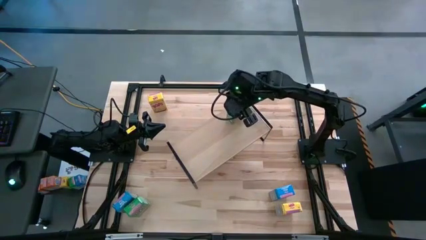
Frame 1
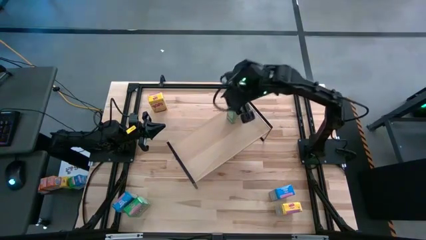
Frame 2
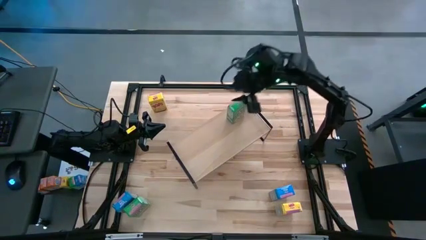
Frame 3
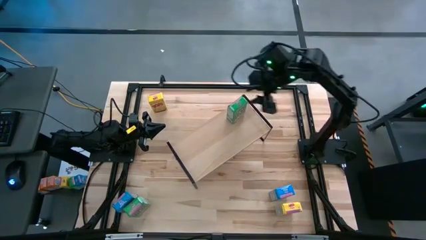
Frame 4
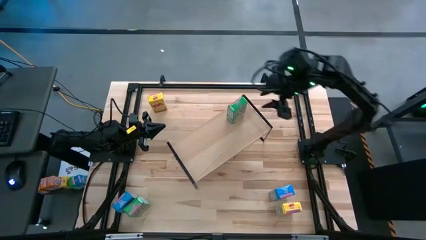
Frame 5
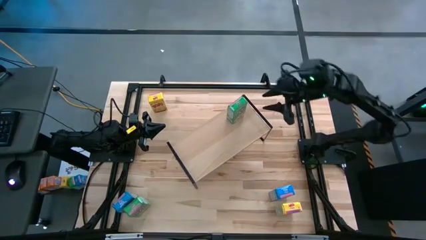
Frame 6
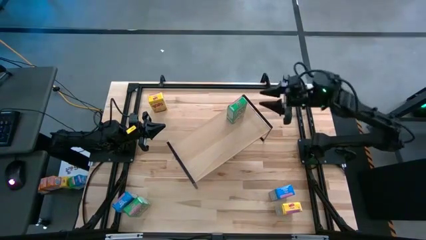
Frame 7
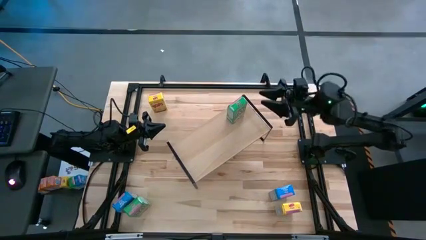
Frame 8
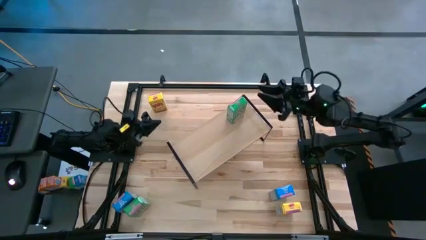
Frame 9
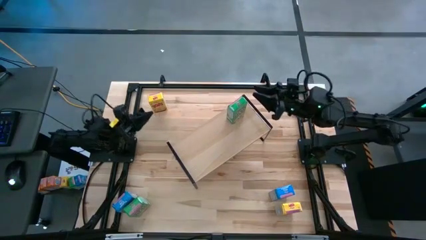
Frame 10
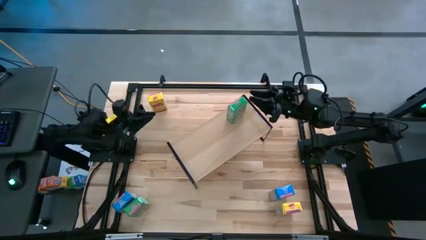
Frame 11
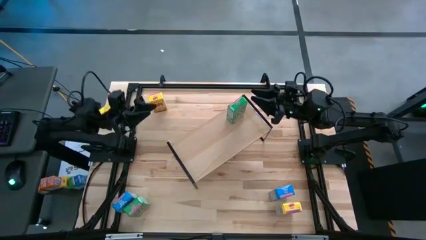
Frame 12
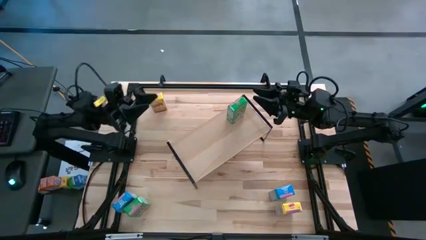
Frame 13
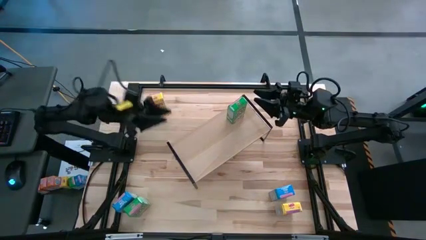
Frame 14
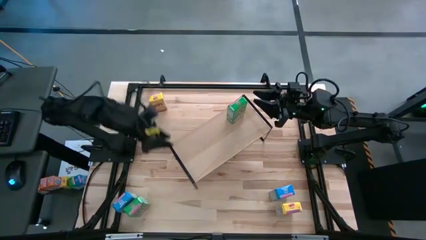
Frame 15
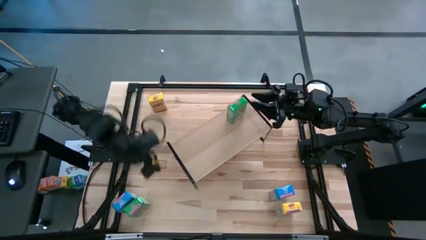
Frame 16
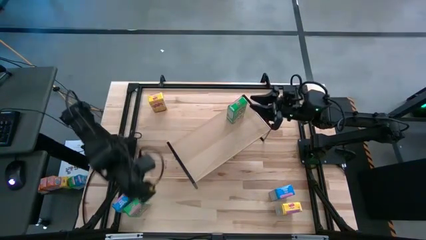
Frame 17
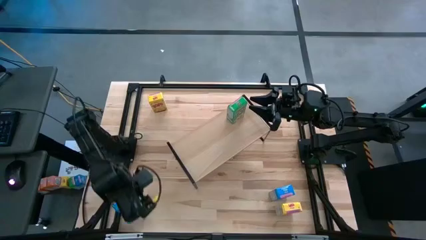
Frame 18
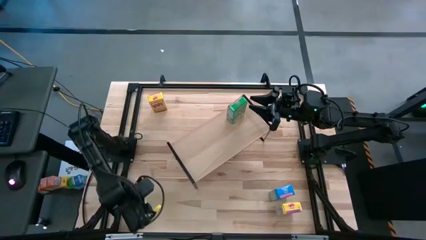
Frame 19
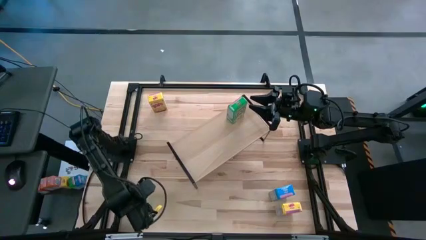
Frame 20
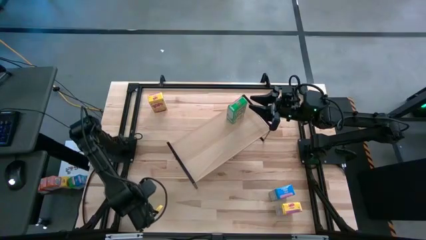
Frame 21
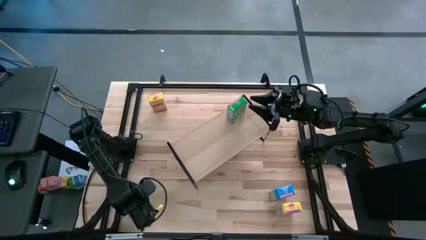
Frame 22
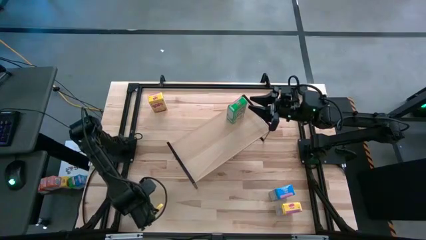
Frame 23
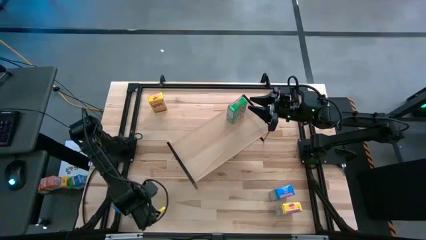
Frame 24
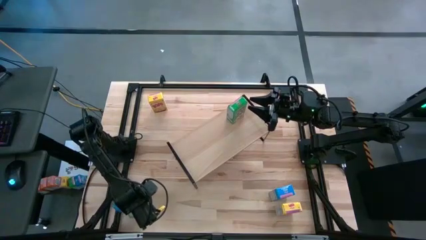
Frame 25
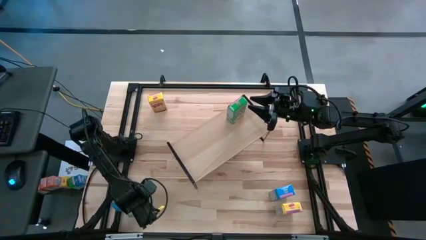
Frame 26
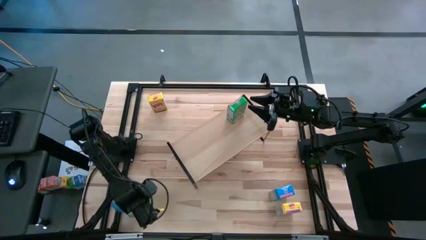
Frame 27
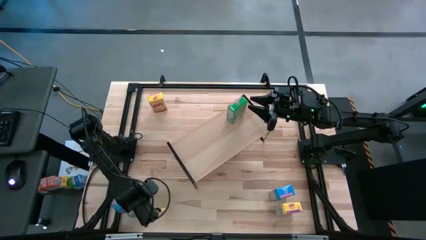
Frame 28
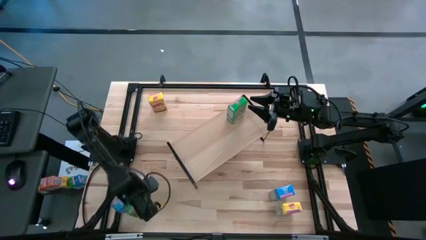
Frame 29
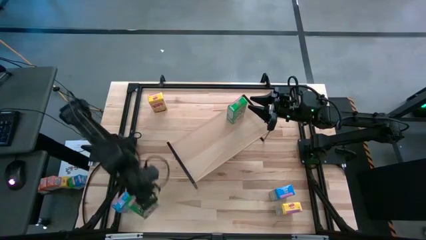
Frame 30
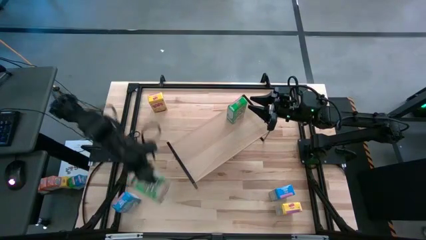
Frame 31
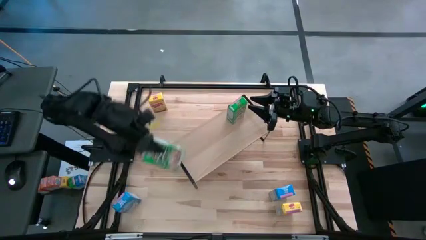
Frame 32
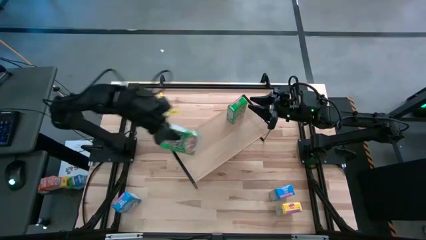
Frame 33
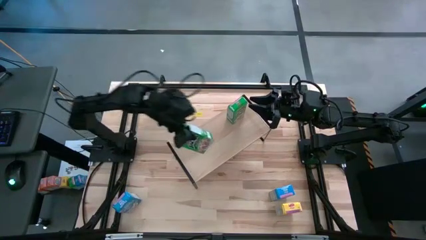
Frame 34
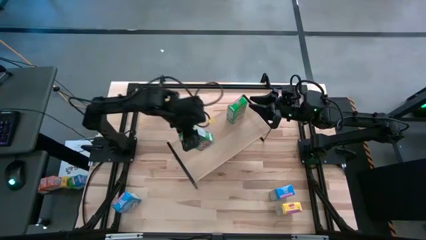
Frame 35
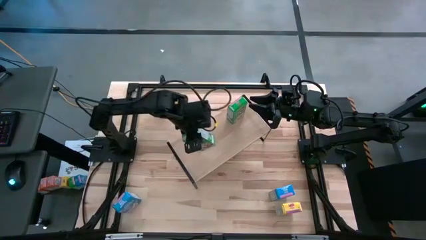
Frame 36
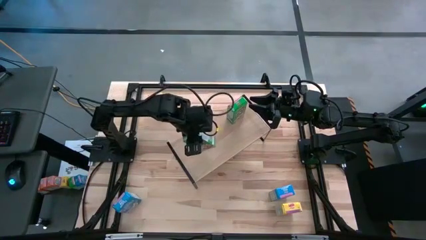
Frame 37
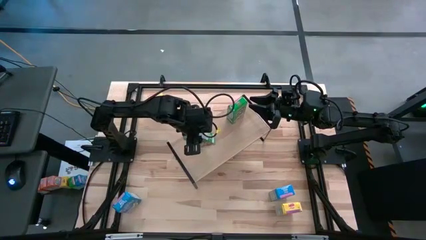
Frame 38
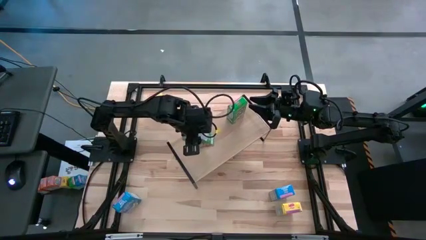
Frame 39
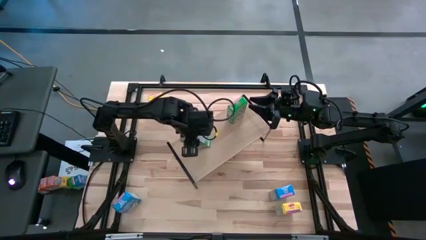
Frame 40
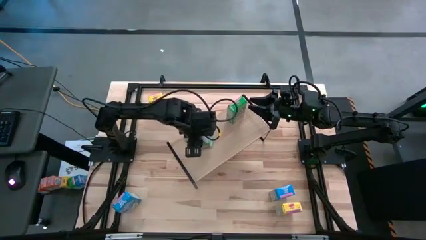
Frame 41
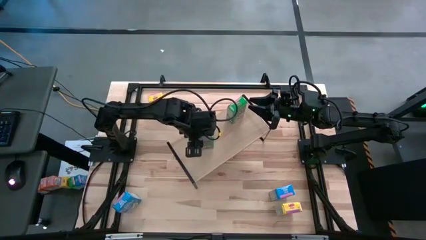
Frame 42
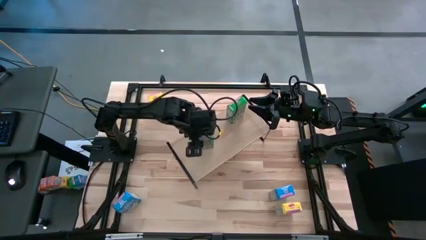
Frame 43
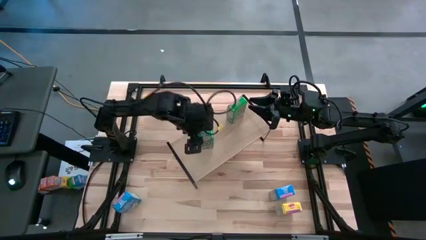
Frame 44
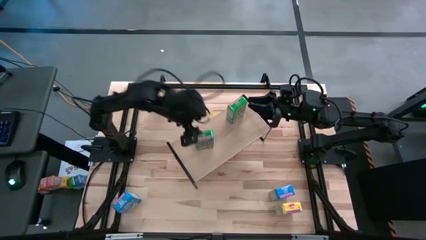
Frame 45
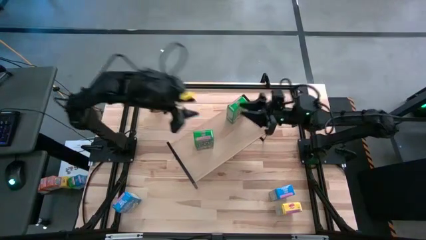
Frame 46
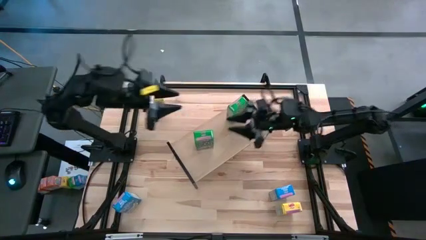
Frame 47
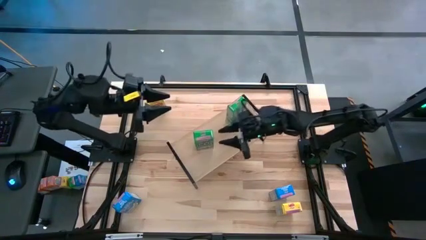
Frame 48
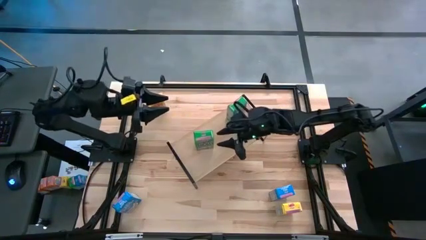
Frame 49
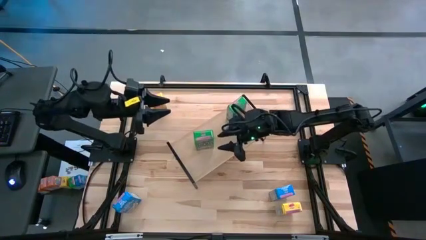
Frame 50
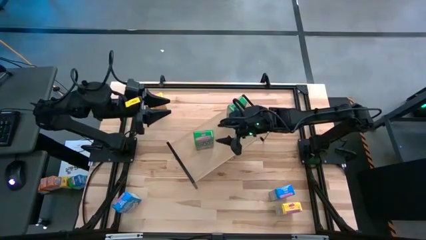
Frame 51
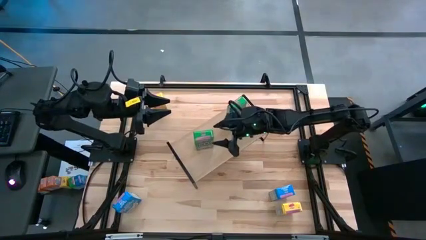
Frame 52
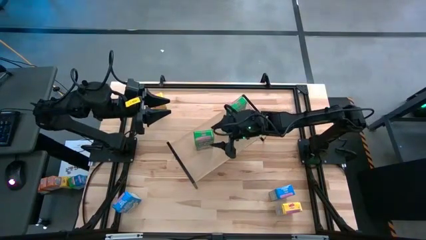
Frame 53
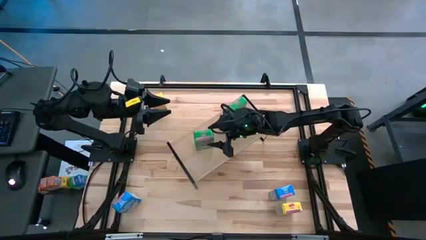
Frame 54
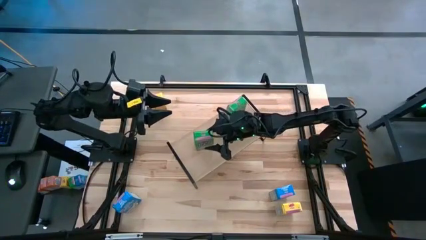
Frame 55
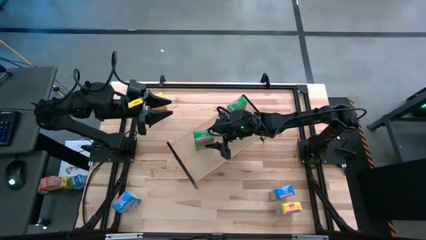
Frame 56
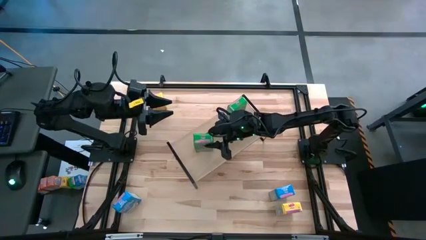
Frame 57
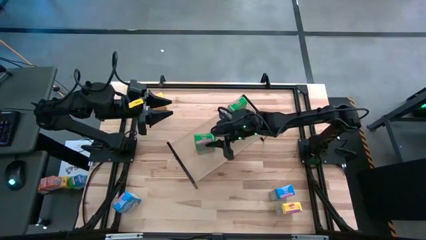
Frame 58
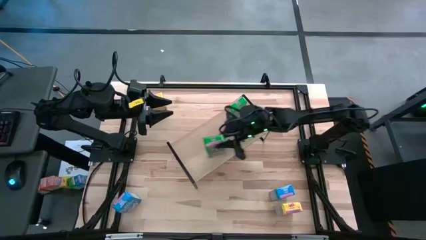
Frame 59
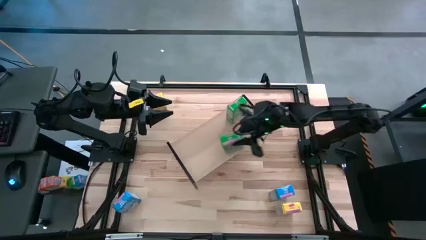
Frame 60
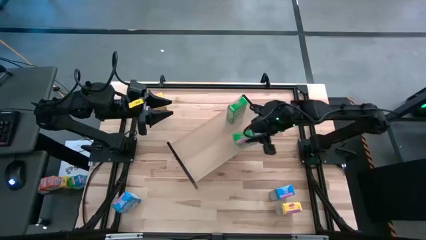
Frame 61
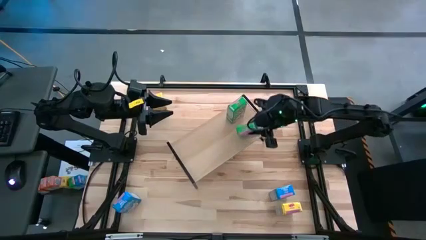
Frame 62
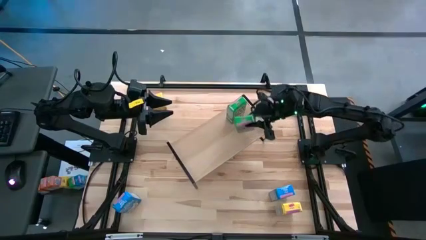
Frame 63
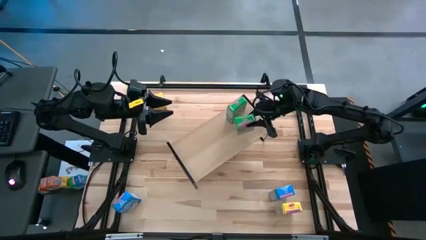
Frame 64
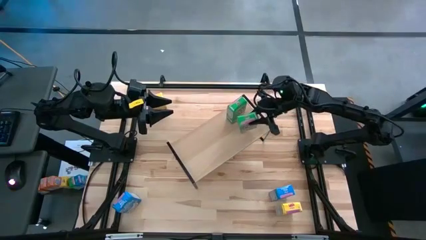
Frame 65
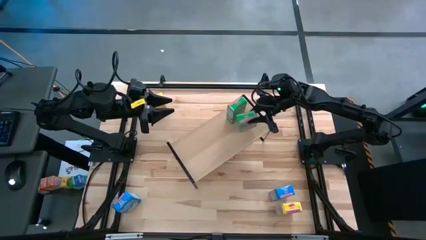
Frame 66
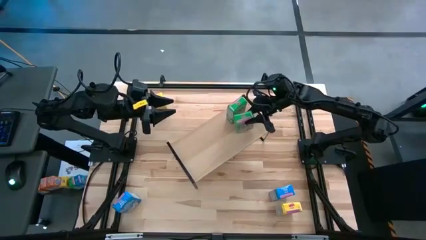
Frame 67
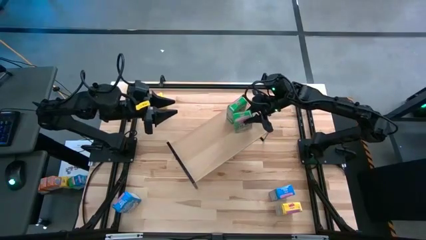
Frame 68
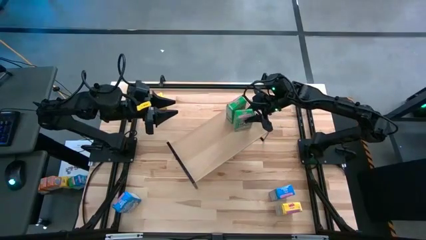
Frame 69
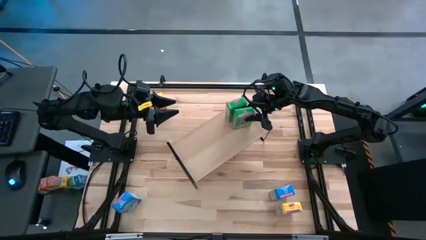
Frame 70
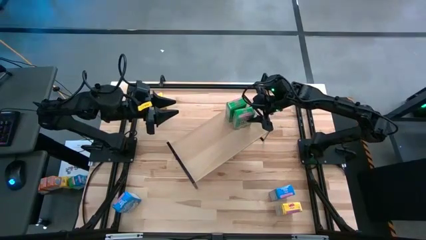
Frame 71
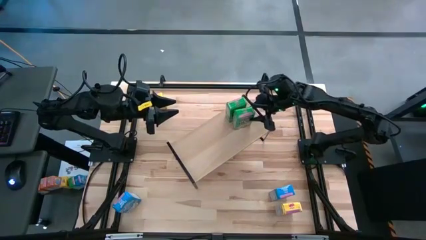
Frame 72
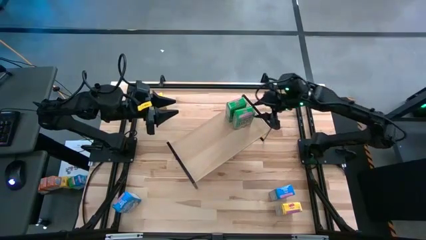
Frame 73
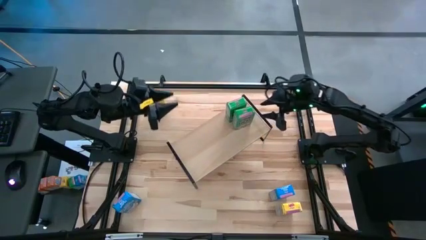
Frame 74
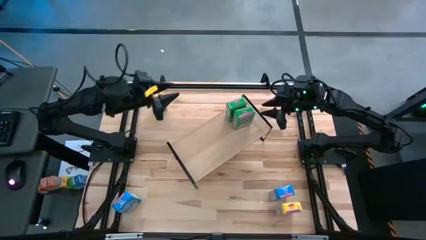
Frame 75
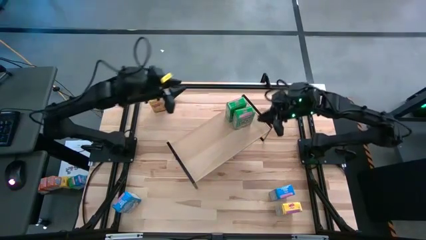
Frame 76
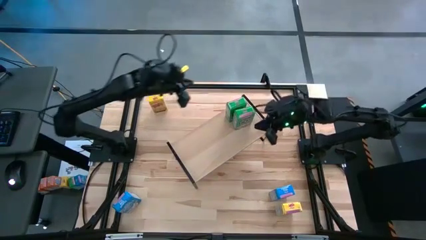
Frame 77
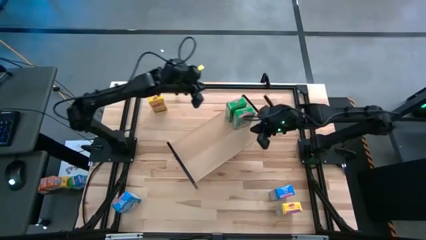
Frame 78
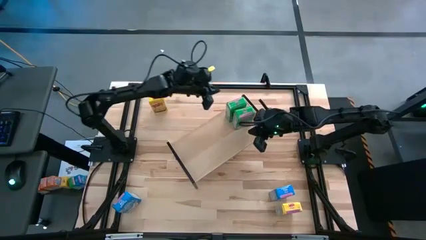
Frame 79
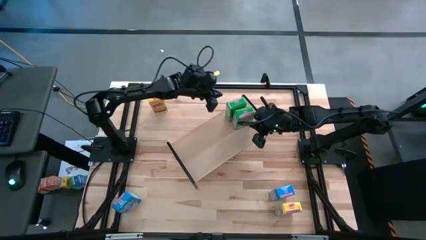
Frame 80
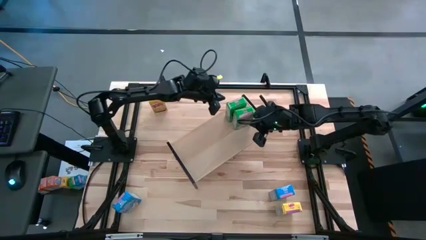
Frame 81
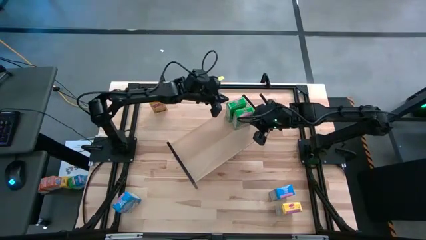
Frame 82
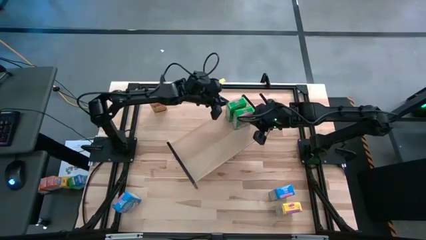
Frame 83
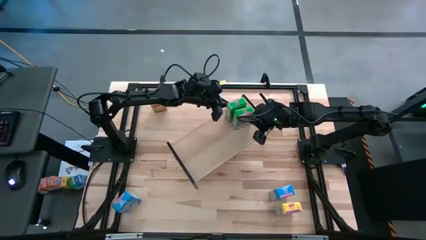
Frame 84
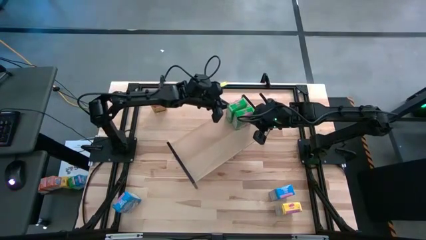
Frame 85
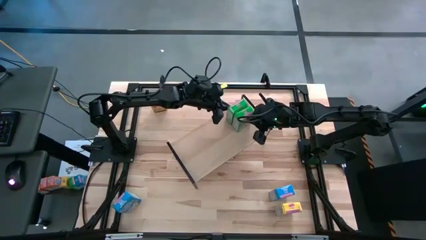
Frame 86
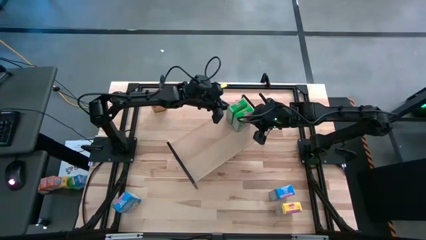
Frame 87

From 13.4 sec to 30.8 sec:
Task: Stack cereal on shelf
Put the green cereal box on the shelf align with the other green cereal box
